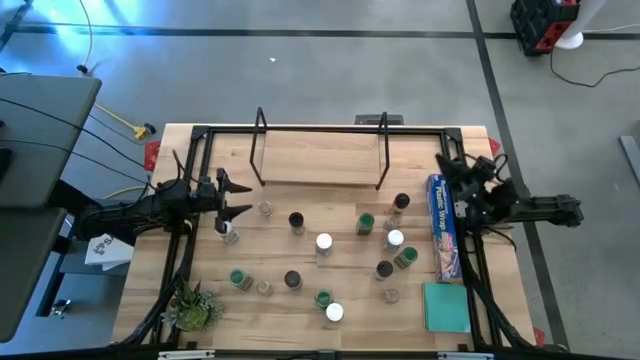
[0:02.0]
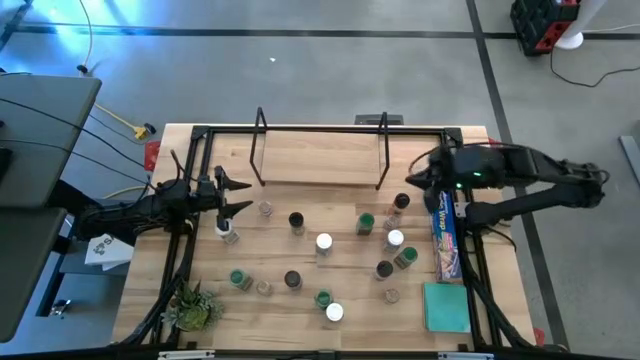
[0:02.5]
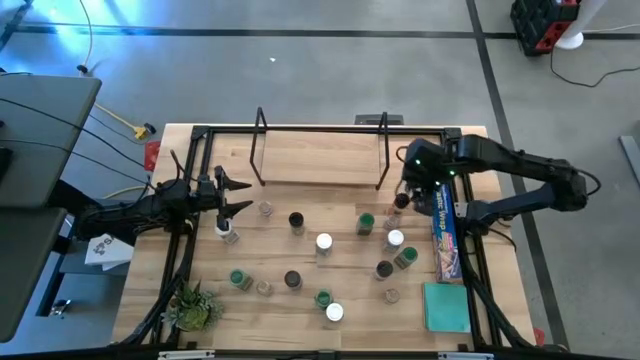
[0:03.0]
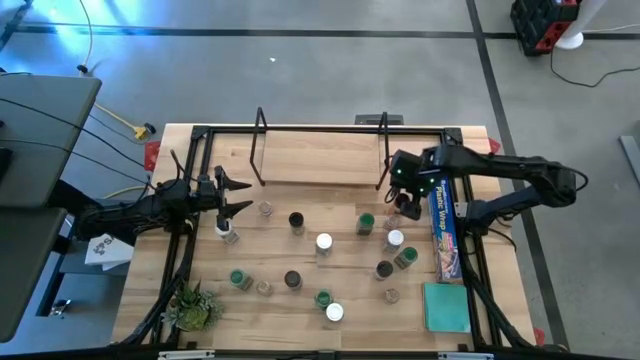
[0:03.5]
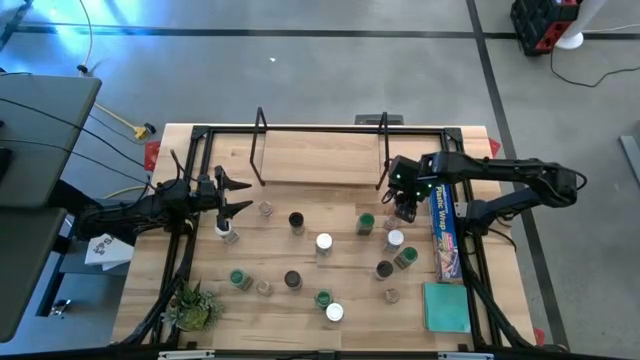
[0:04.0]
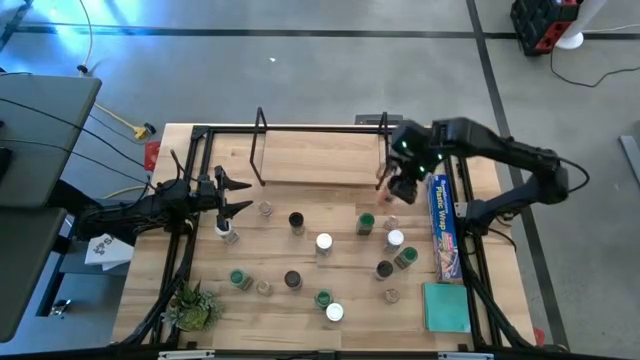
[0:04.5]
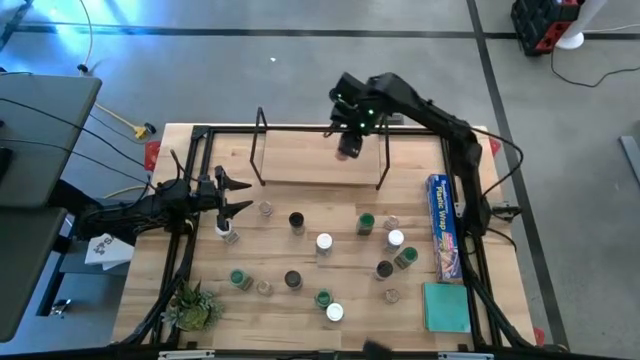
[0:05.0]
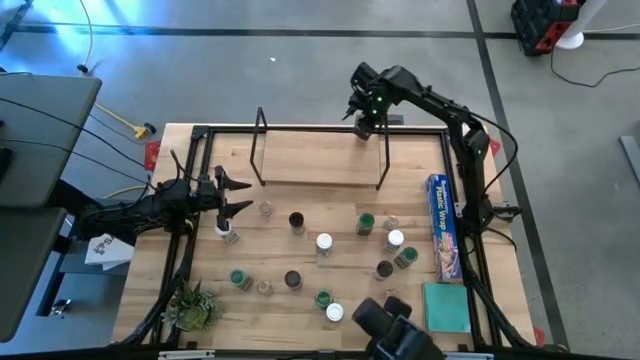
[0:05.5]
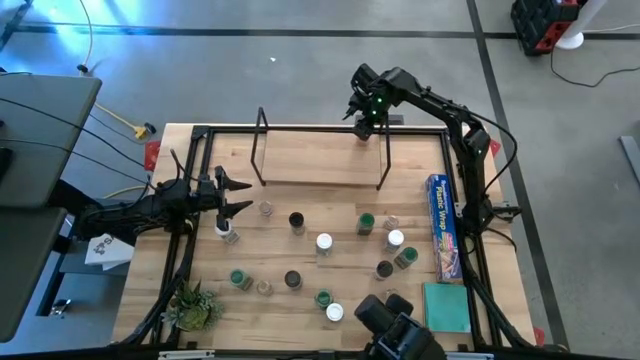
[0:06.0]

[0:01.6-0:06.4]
Task: Shelf spices
Put the black seasoning bottle on the shelf

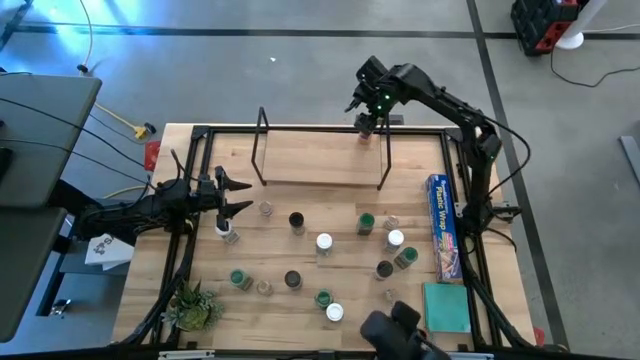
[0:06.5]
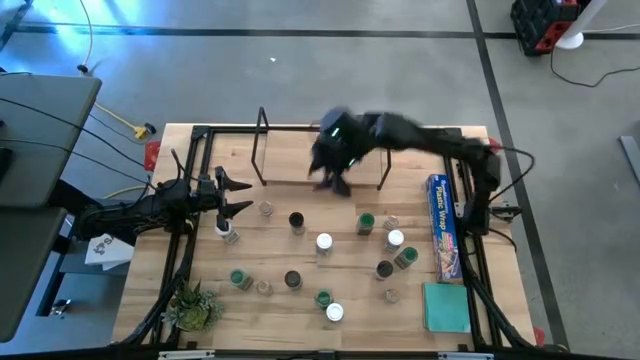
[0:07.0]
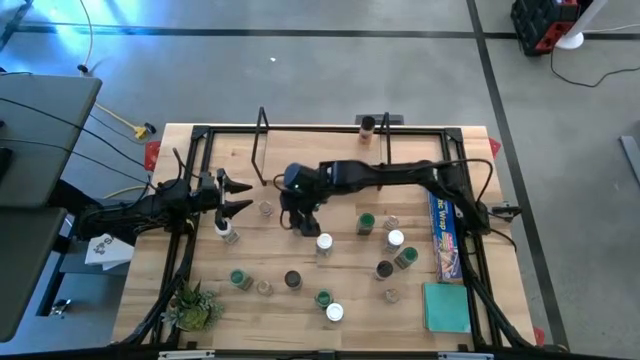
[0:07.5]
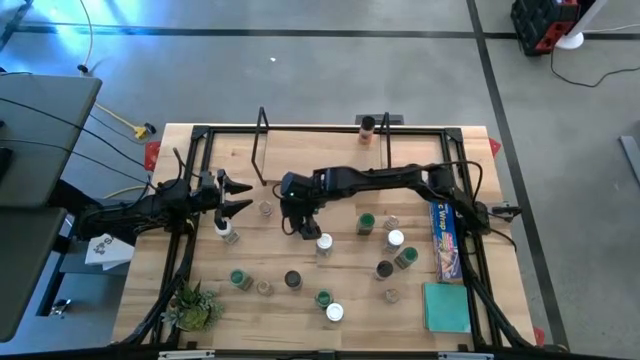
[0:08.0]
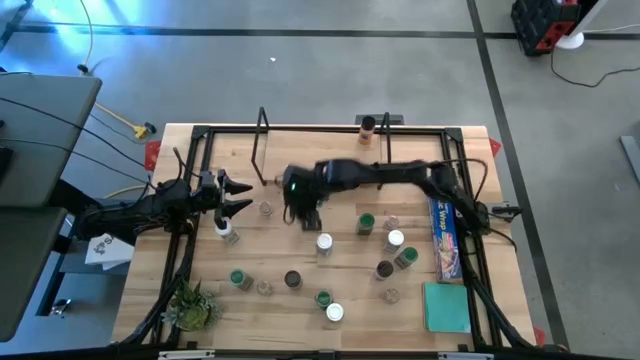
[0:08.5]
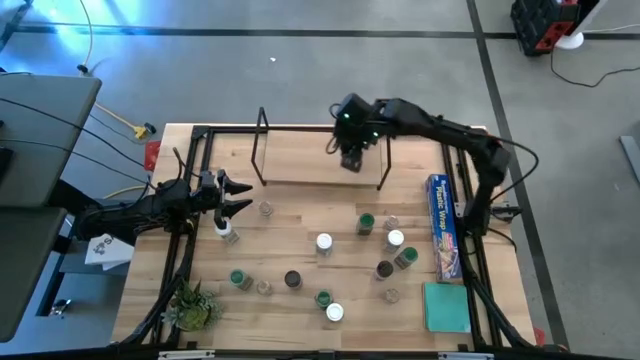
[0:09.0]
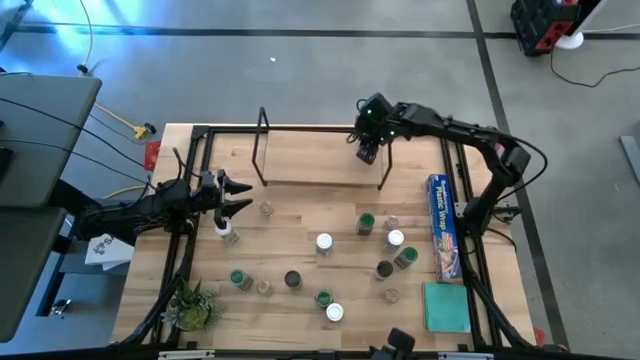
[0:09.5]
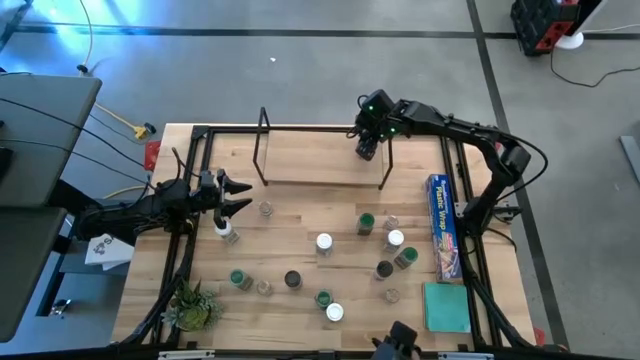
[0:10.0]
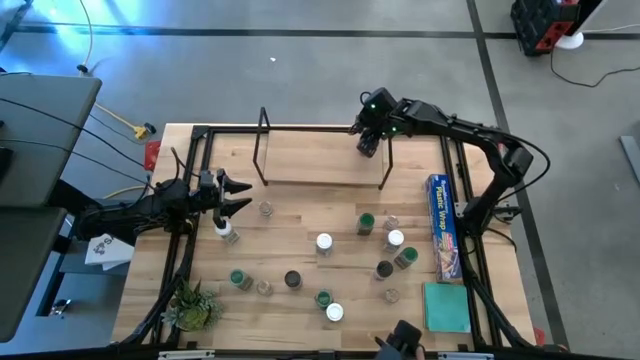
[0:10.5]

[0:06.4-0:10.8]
Put the black seasoning bottle on the shelf aligned with the other black seasoning bottle

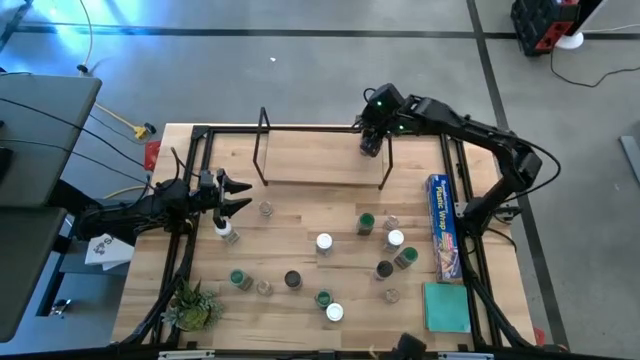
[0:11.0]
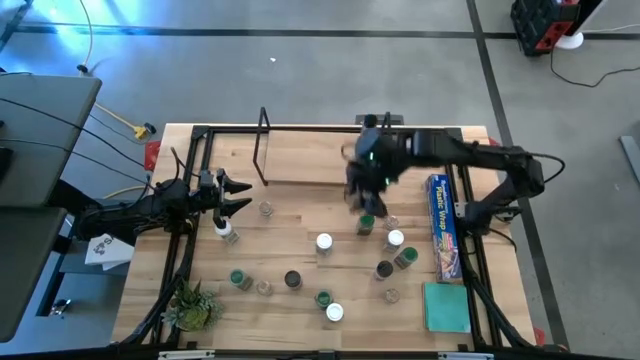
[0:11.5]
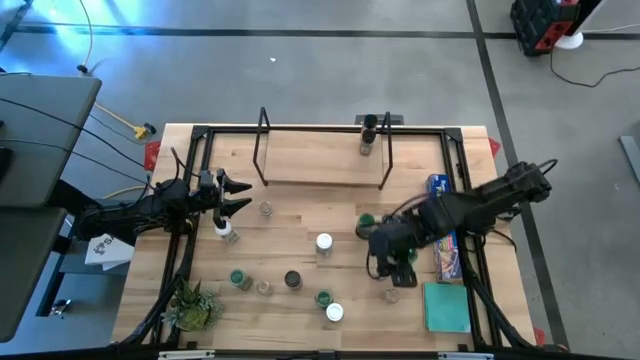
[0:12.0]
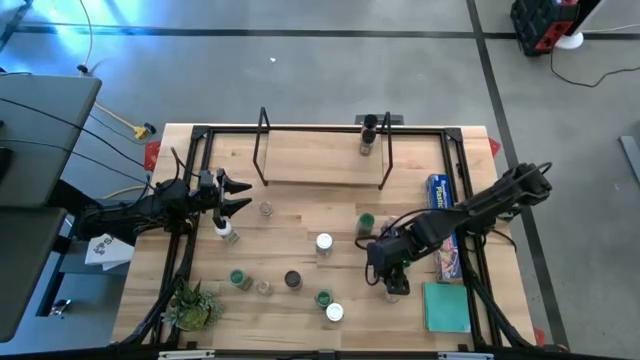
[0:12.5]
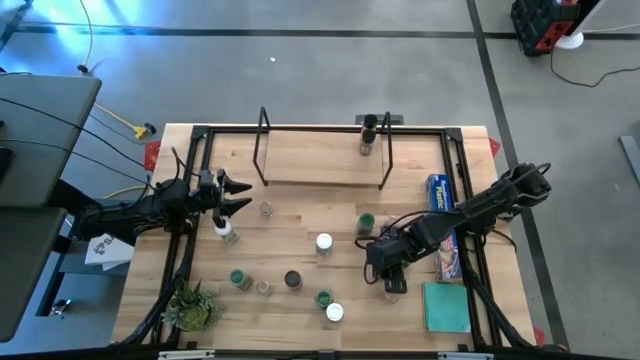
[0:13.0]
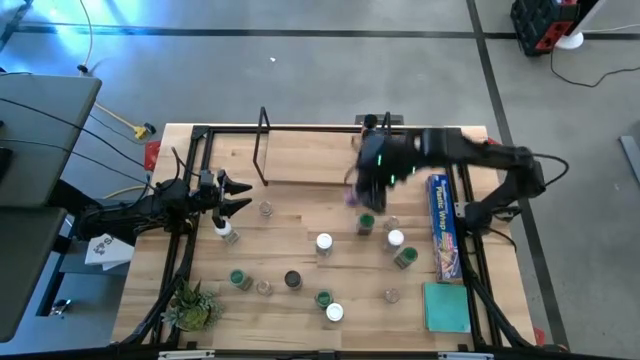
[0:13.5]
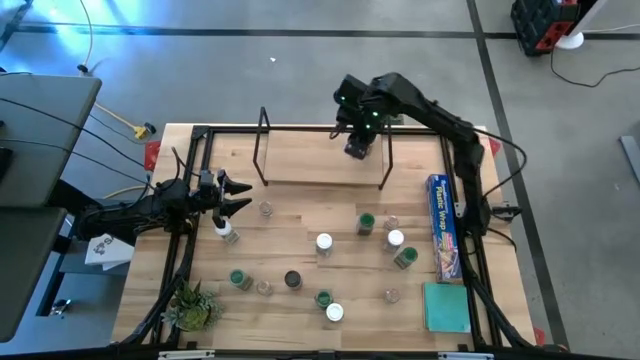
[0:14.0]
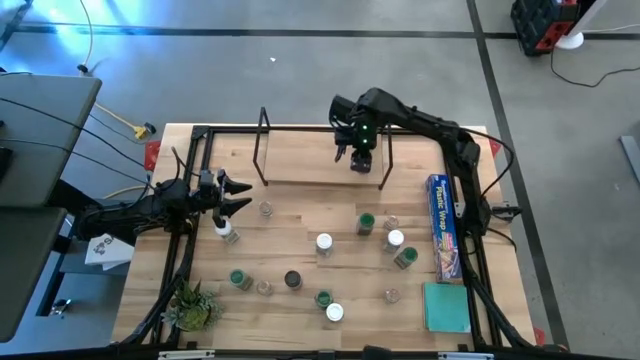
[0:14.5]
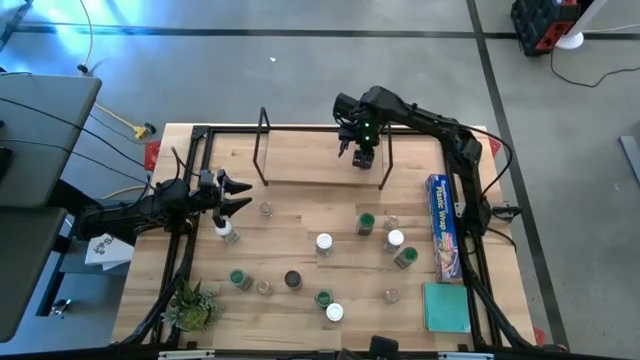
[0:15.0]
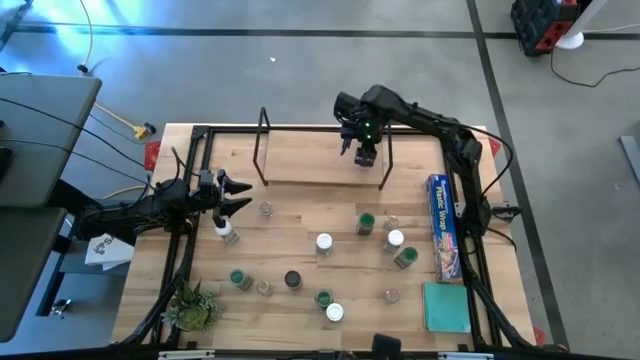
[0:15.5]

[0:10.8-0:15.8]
Put the black seasoning bottle on the shelf aligned with the other black seasoning bottles

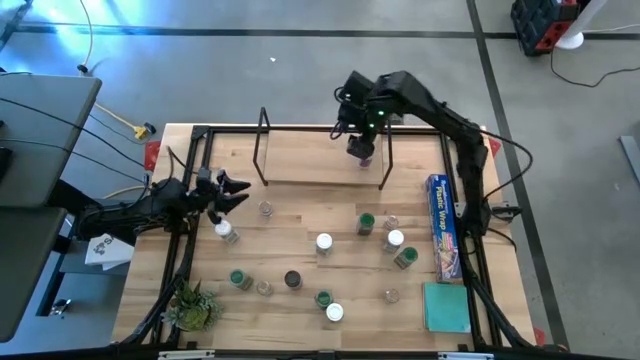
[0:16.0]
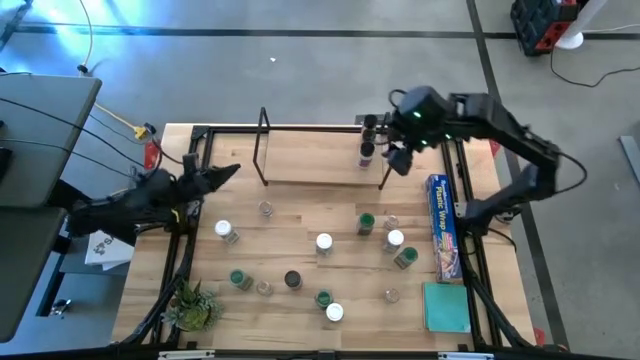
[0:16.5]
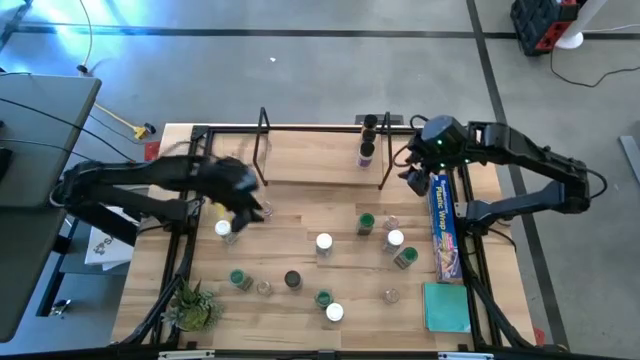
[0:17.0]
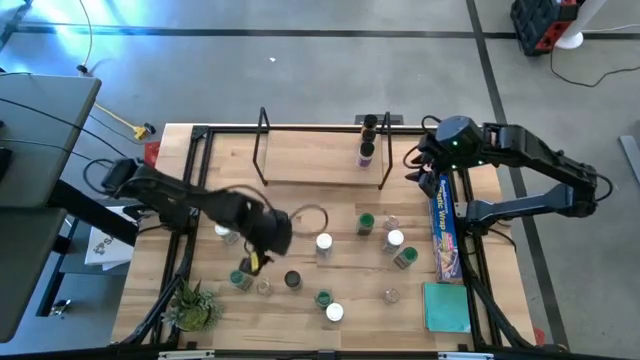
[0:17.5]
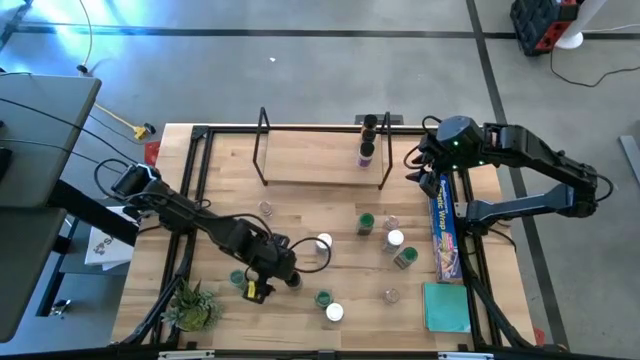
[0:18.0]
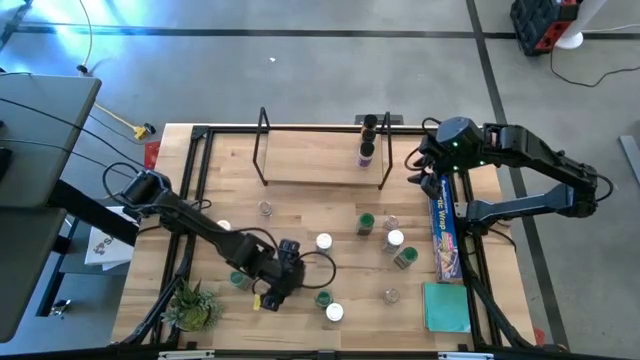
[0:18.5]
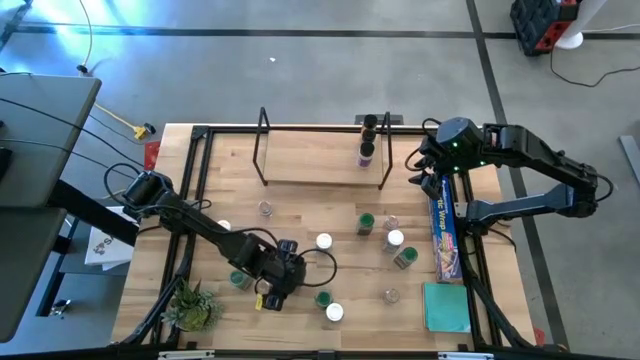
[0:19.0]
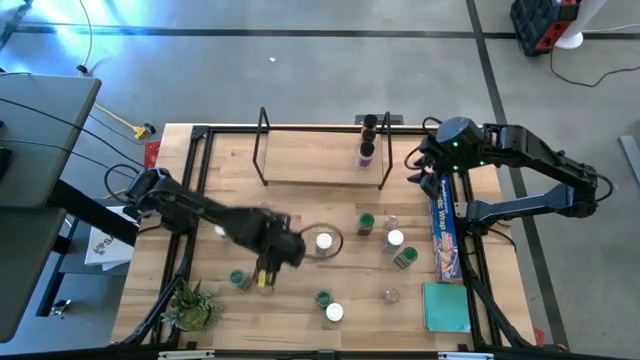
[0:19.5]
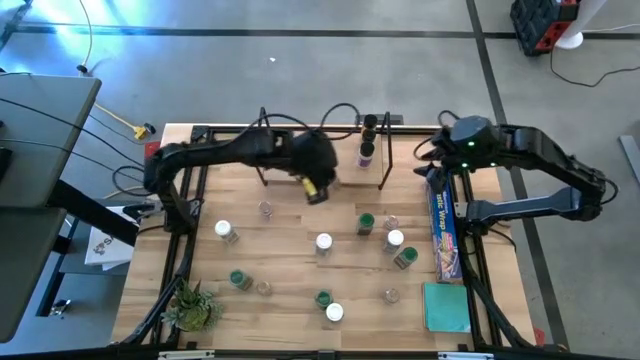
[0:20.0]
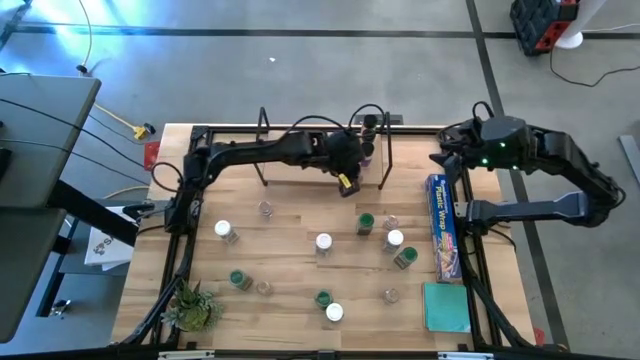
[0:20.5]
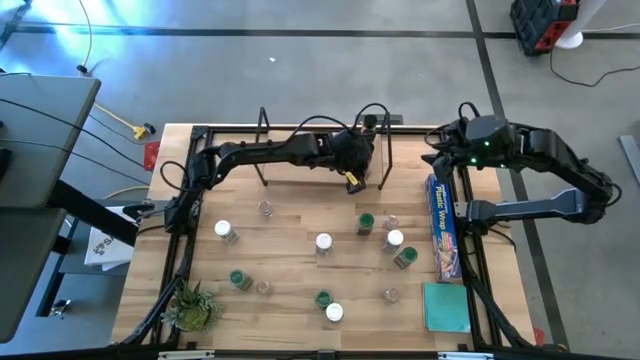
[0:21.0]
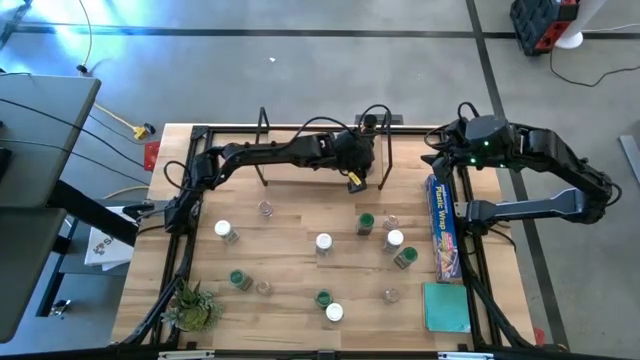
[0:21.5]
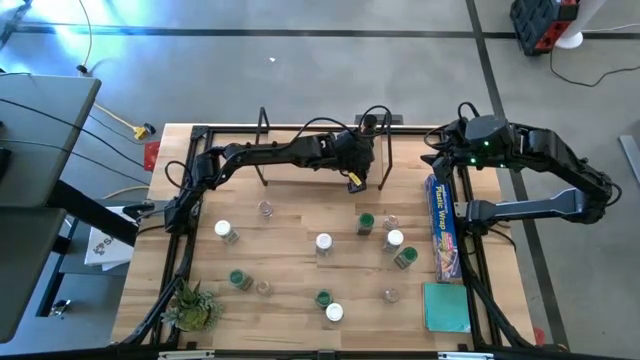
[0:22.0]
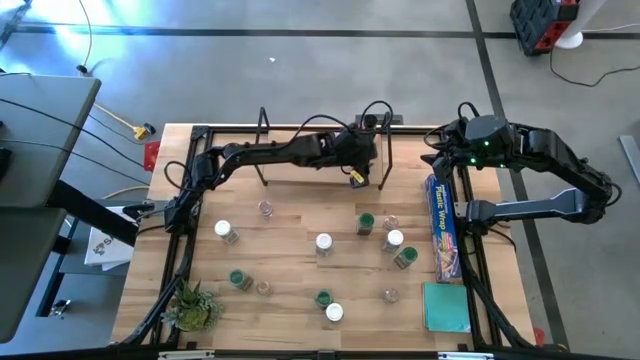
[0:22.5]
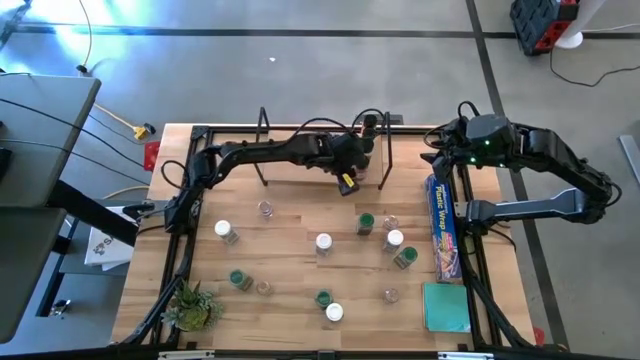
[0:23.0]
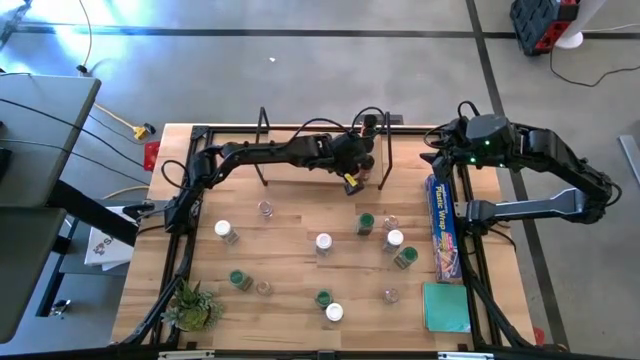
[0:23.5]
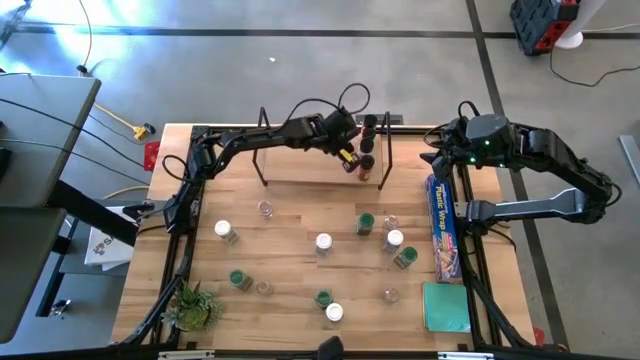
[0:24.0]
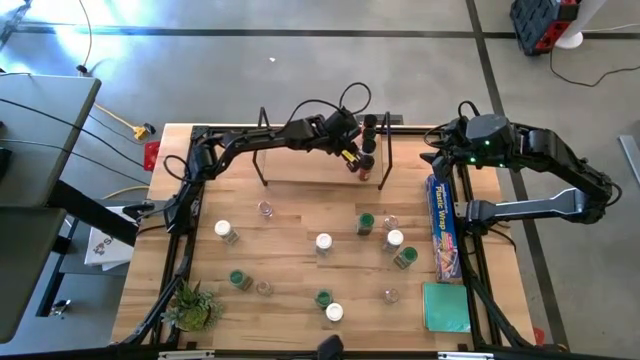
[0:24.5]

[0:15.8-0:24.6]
Put the black seasoning bottle on the shelf aligned with the other black seasoning bottles
